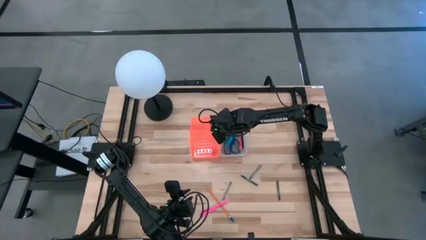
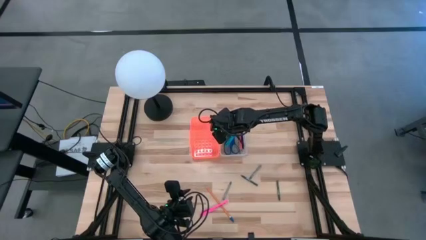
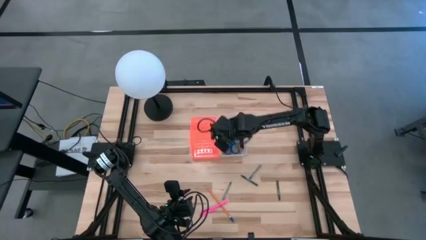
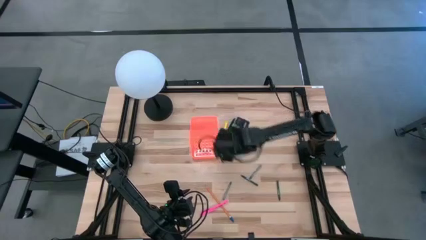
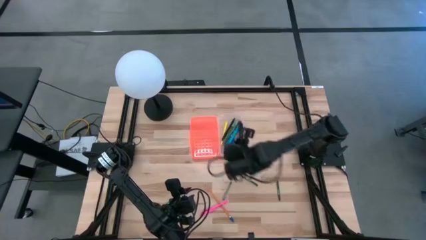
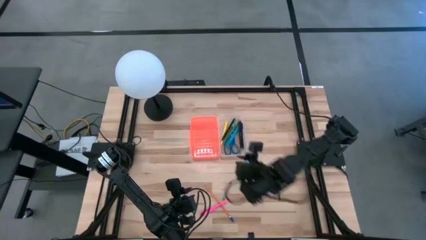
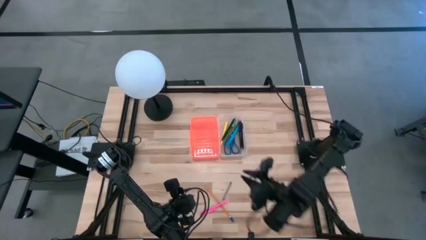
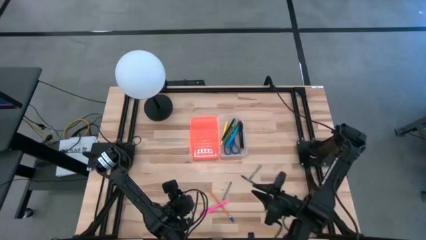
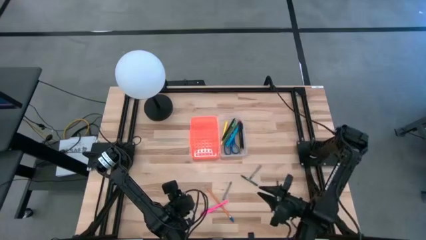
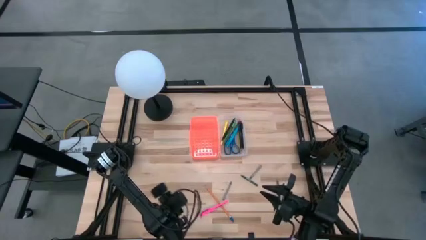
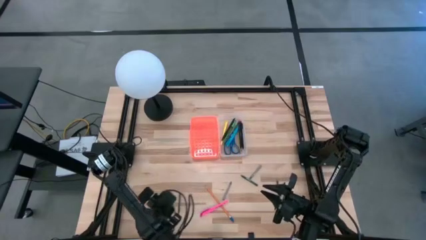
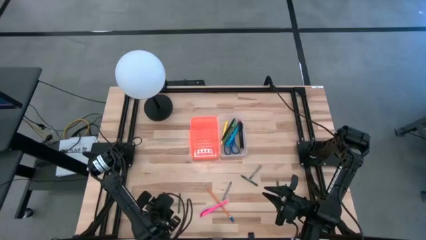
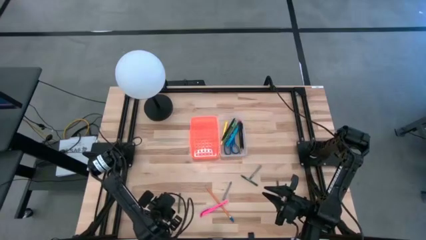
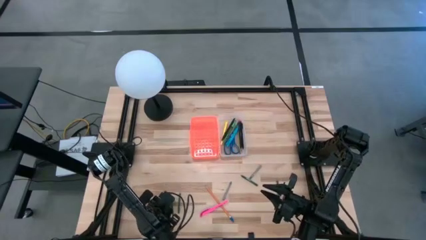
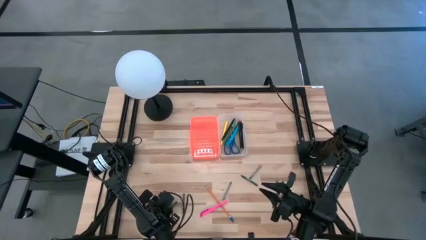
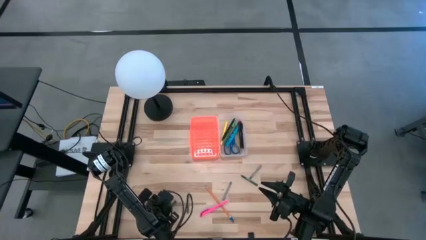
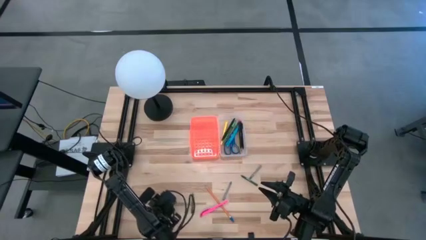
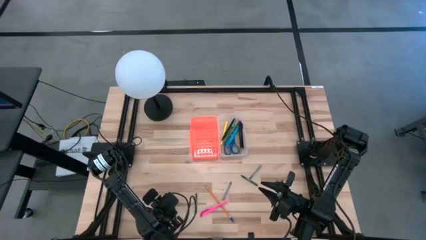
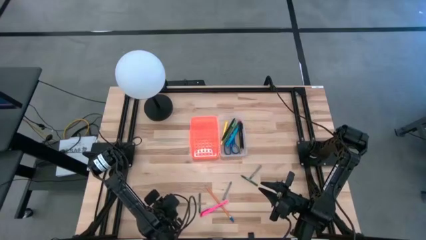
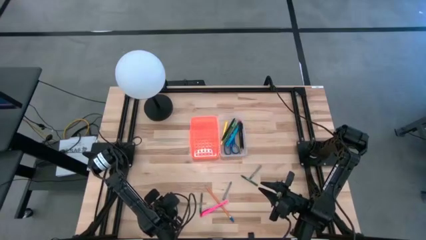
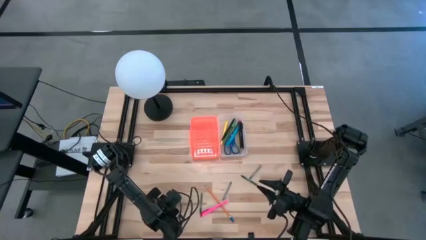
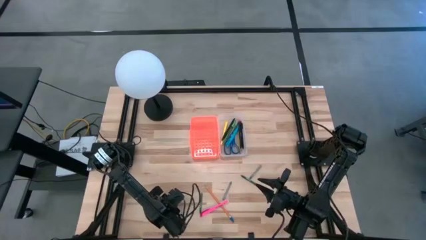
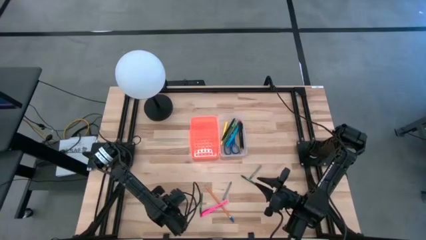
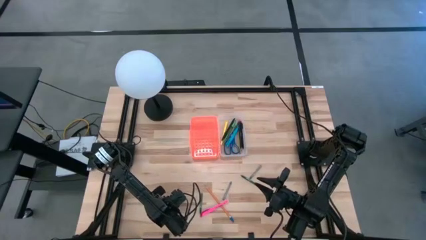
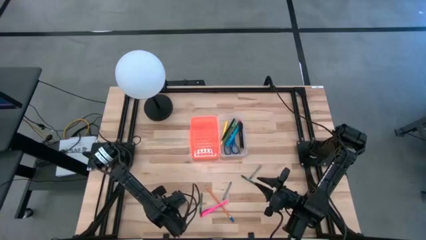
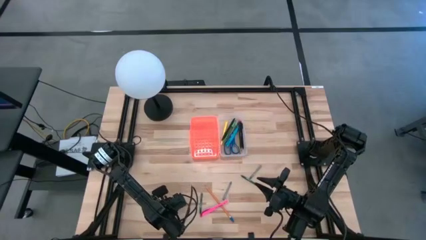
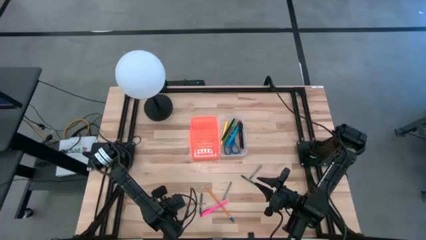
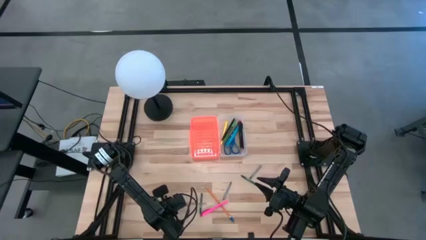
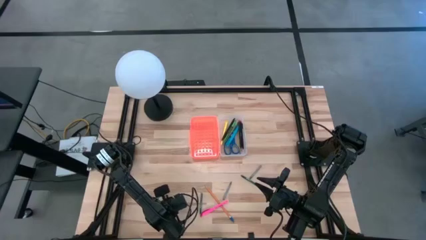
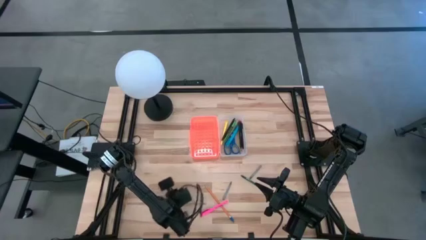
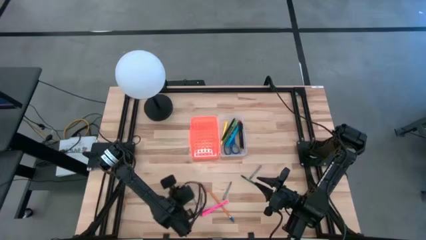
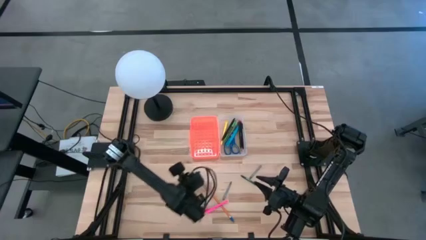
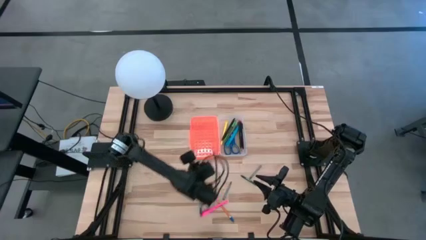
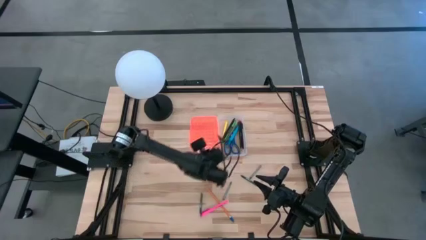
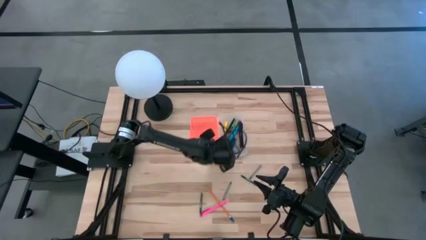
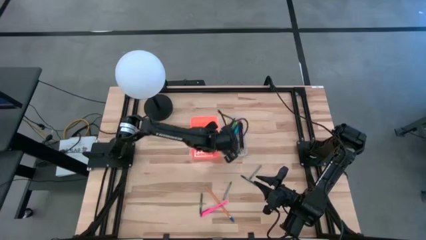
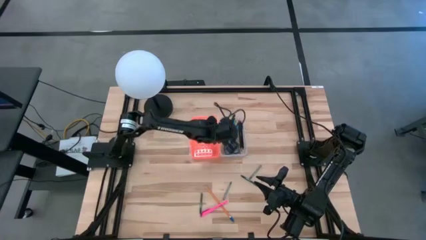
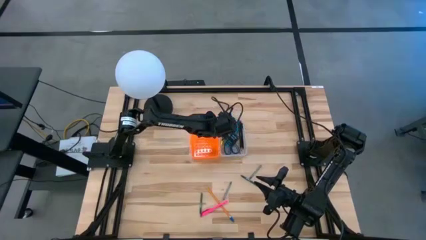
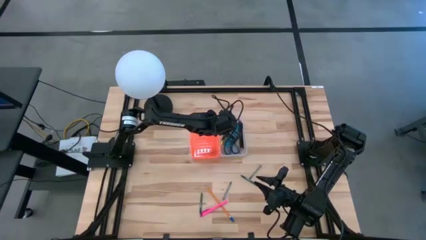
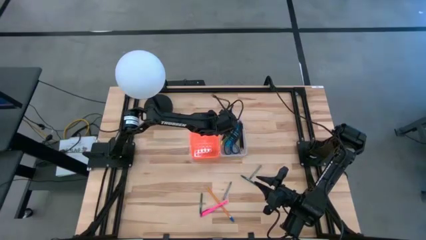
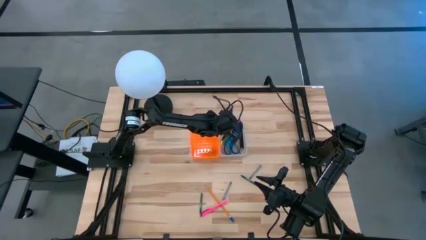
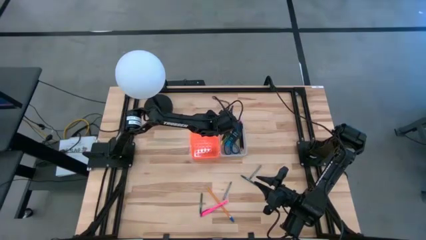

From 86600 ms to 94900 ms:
Task: Pick & place school supplies into a supply box
Put the green crayon into the orange supply box

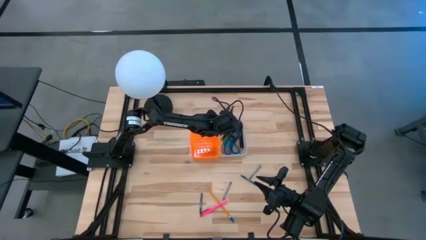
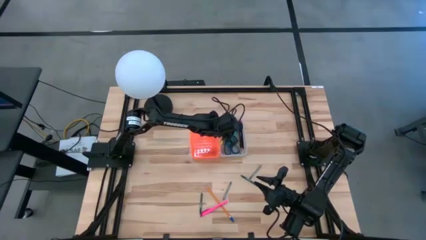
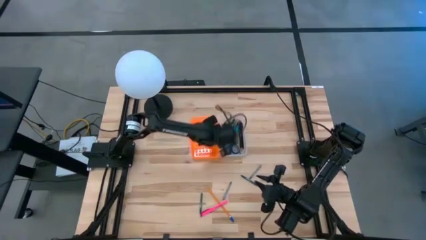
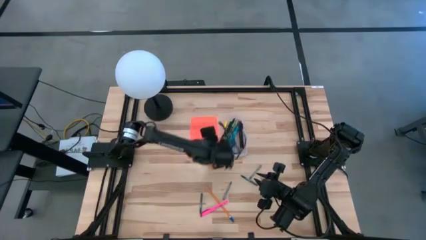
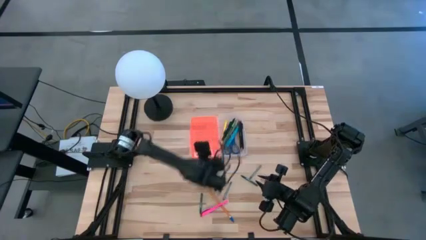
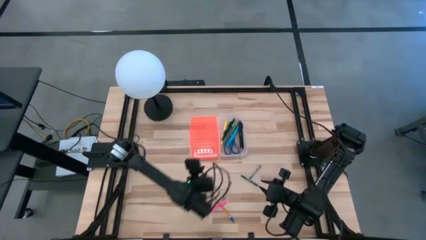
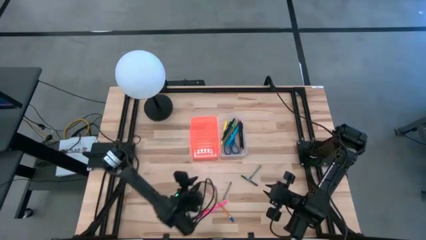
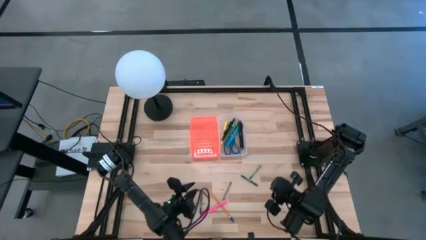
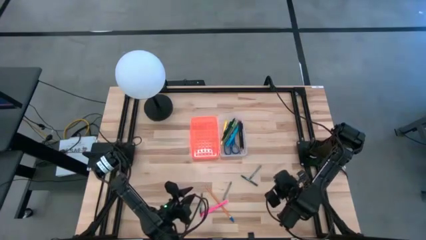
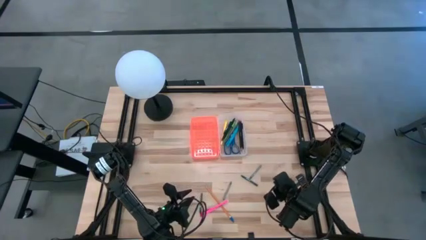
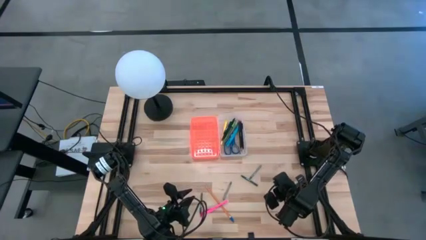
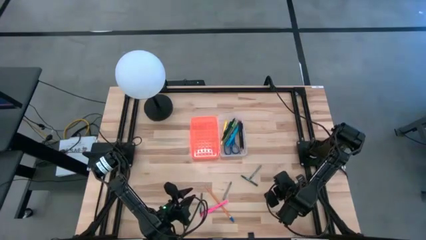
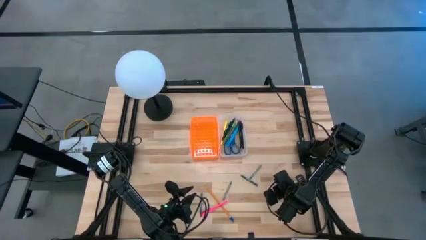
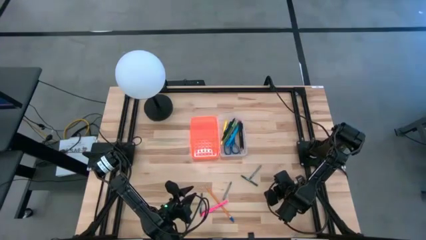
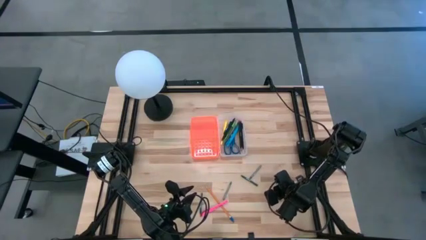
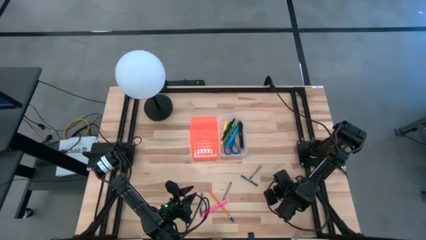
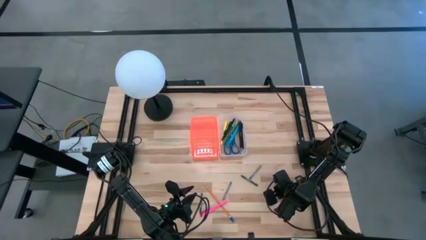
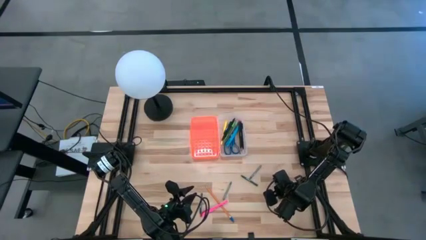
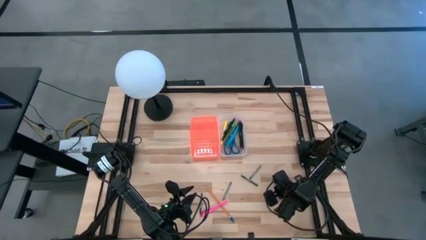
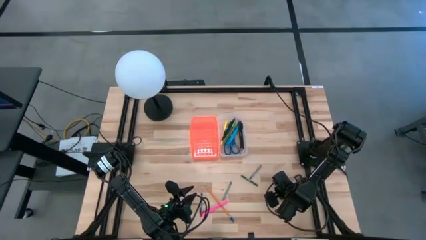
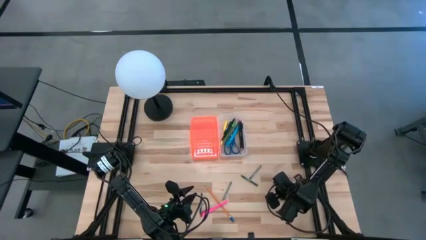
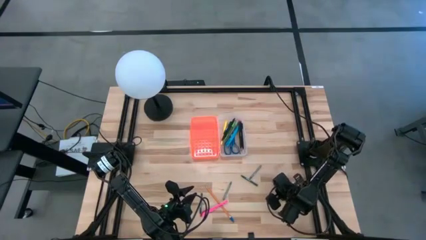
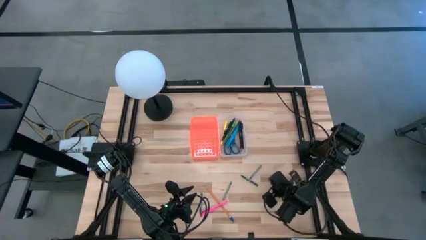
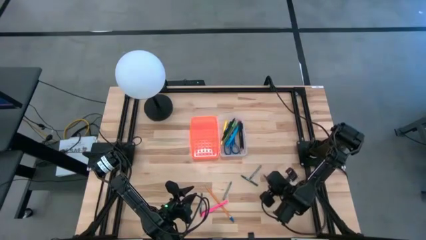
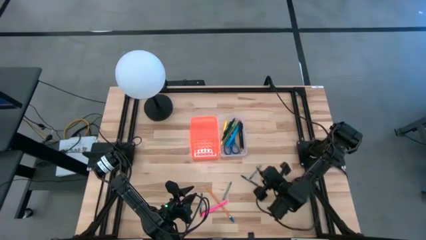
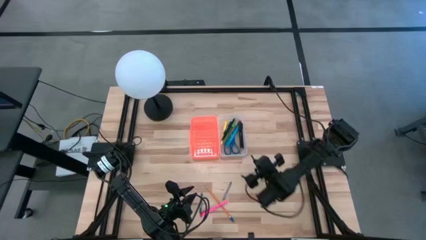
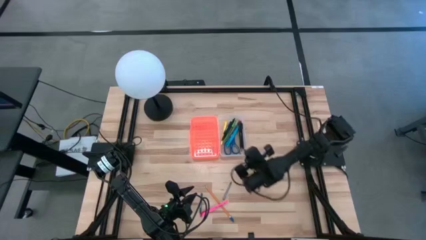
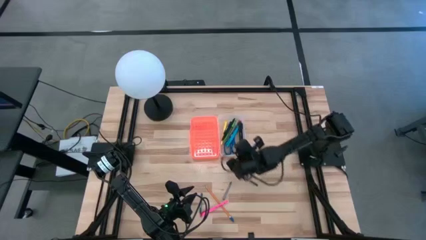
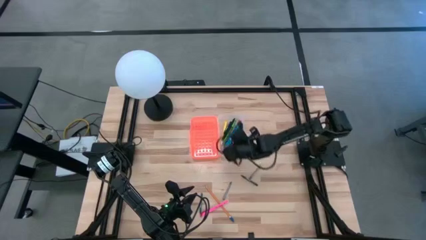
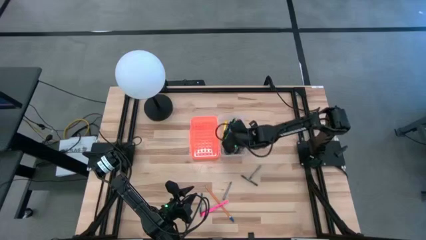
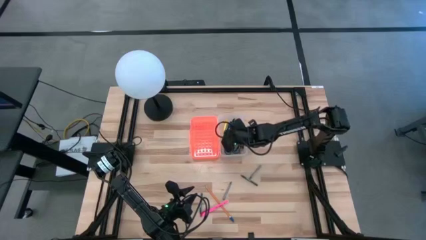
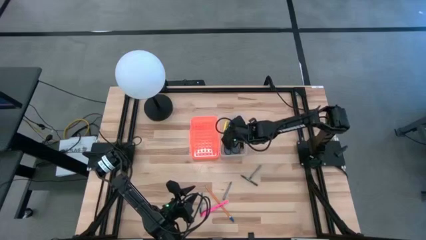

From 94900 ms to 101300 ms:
Put the green crayon into the orange supply box

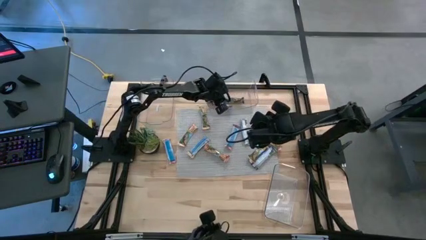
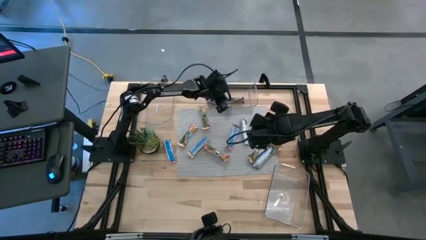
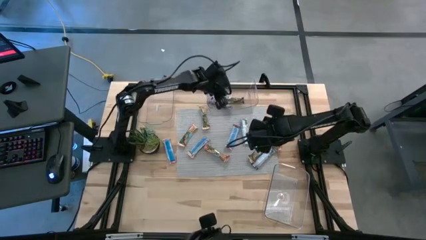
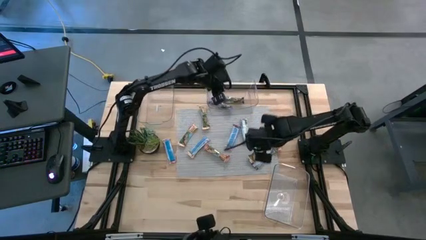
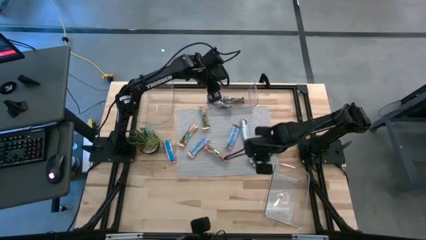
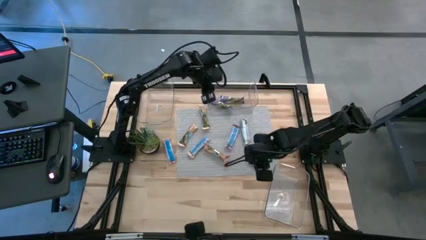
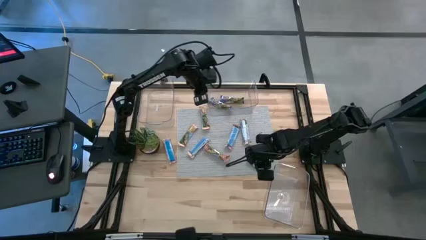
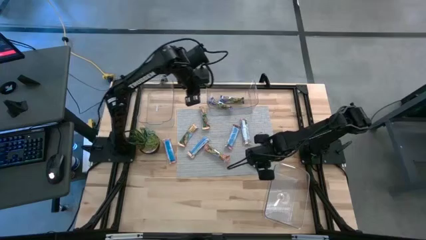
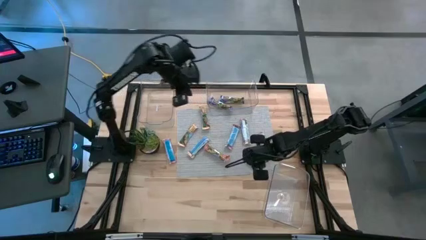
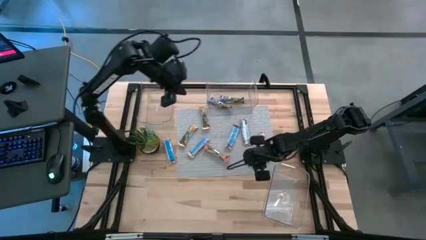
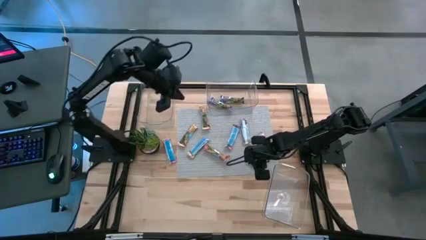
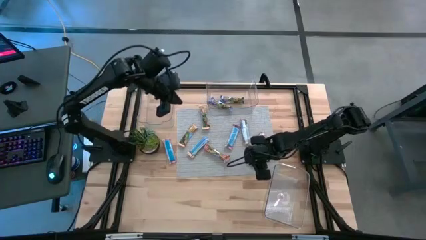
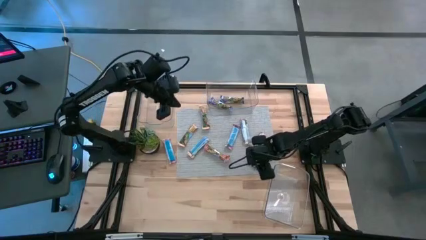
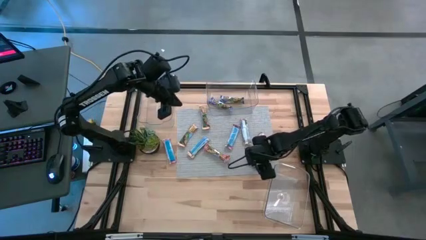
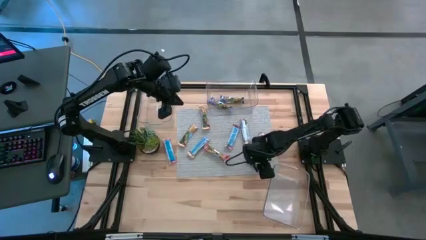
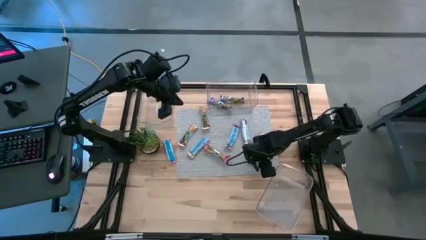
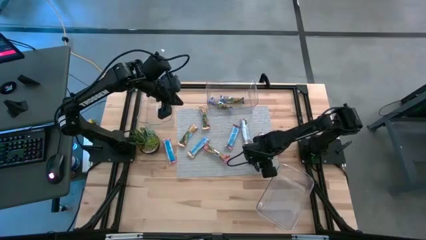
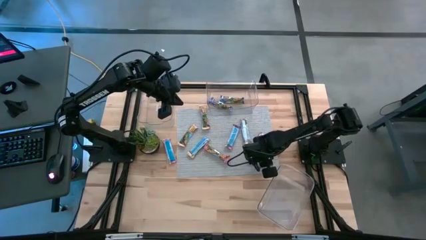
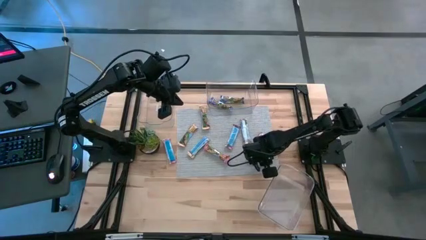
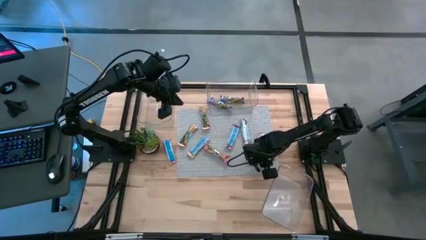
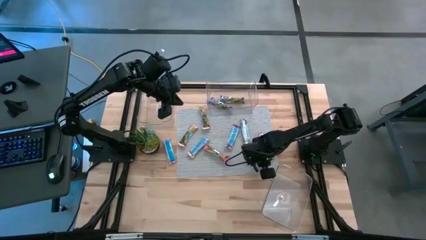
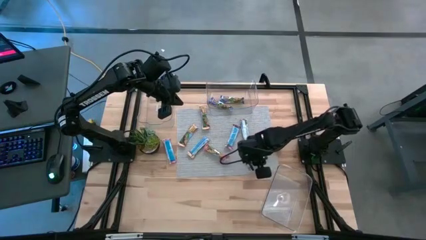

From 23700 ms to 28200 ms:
Task: Pick and place Granola Bars by type
Put the blue granola bar into the right transparent bin
